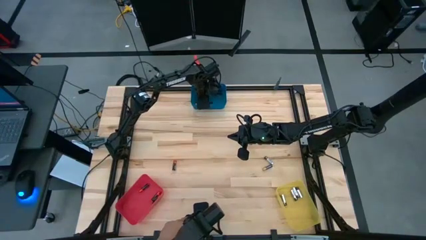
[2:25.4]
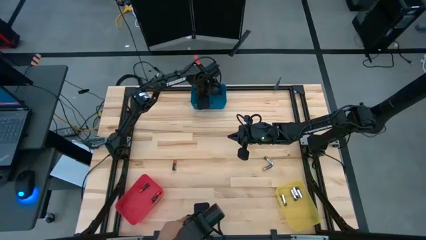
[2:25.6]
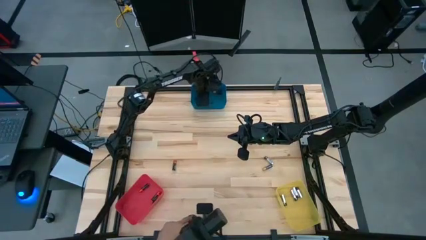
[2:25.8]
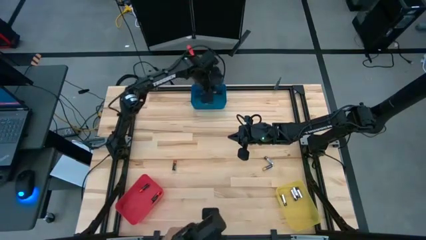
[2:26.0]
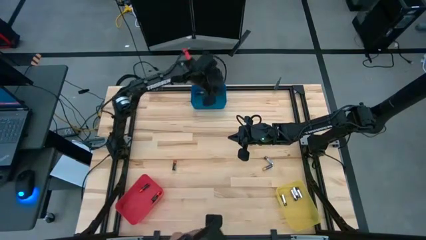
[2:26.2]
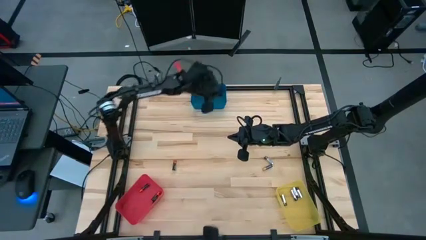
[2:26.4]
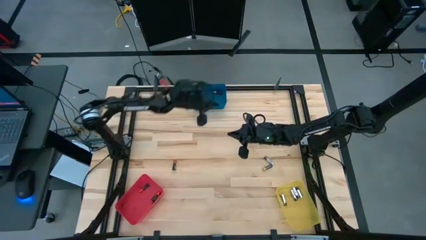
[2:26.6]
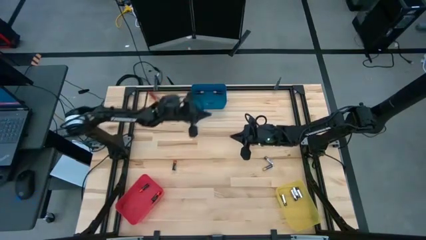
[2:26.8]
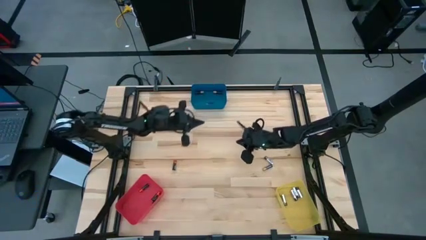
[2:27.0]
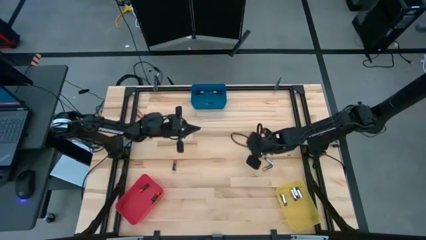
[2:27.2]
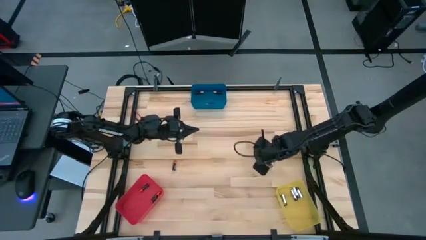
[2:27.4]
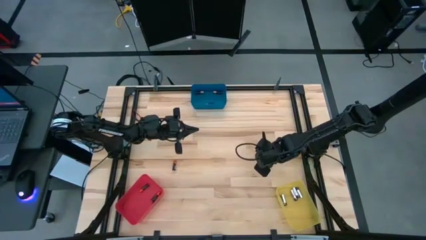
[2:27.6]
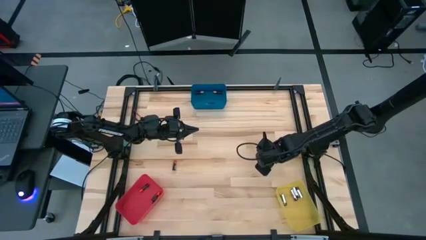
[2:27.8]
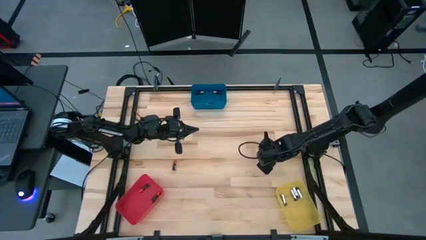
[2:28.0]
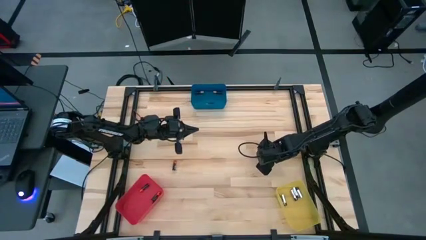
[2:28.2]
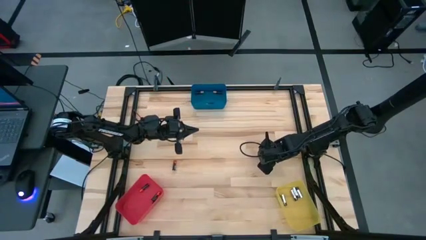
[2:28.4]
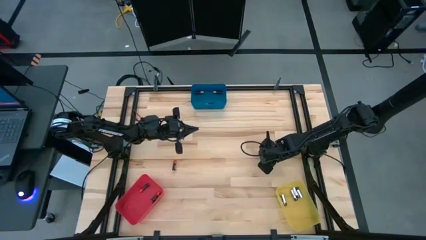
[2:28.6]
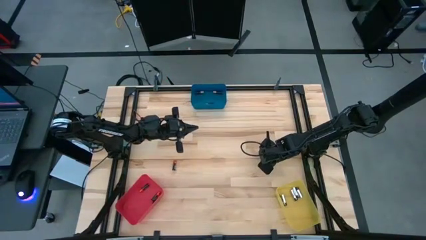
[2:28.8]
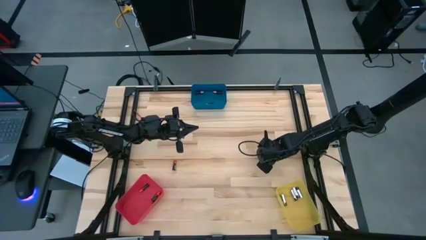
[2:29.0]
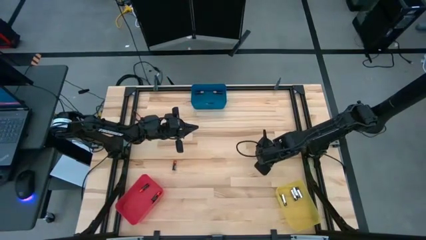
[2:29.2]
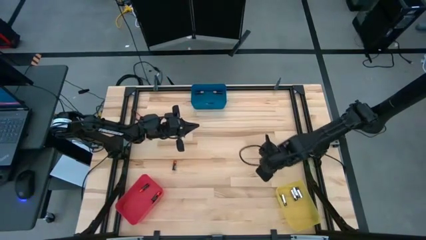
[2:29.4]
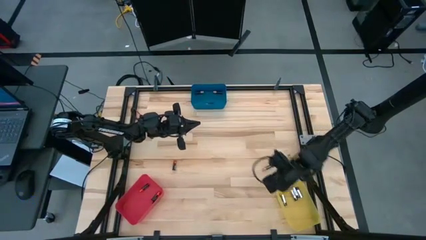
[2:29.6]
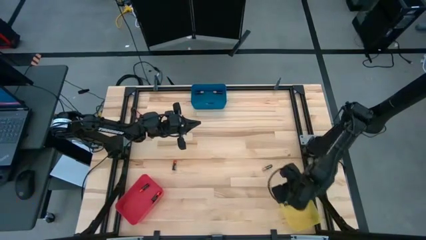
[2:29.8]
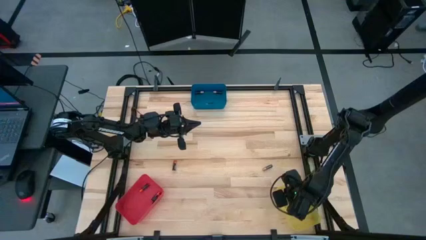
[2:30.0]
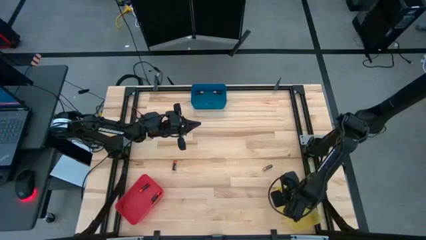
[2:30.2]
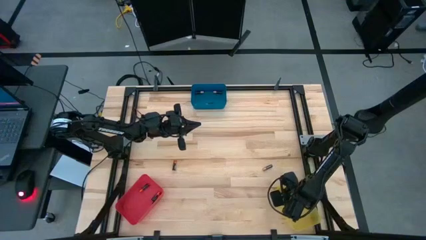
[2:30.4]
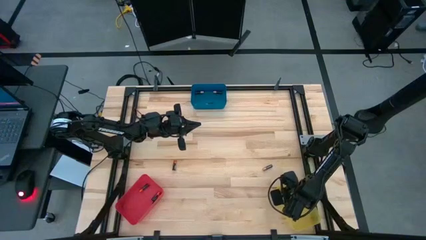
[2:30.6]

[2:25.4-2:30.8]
Task: Sort batteries
Put the silver battery into the yellow bin

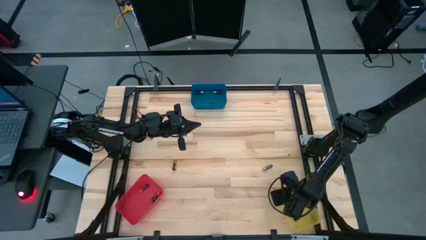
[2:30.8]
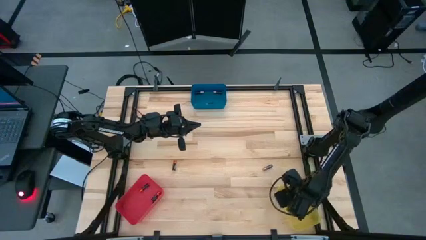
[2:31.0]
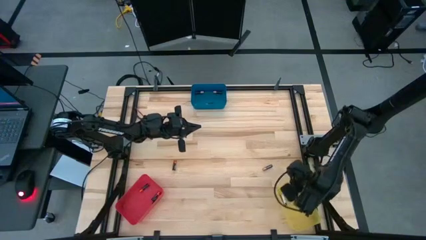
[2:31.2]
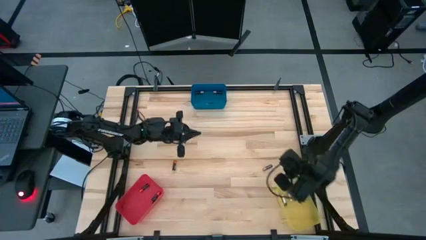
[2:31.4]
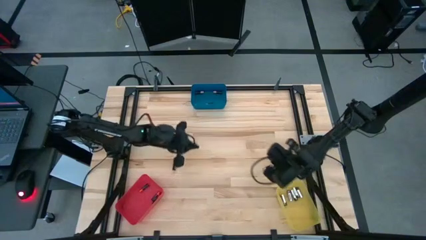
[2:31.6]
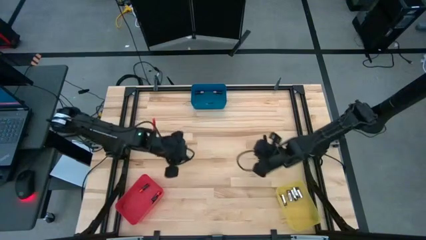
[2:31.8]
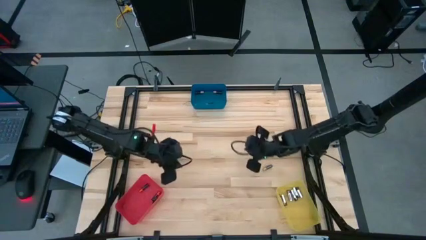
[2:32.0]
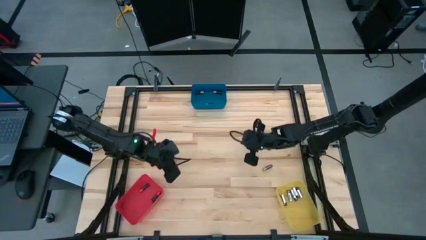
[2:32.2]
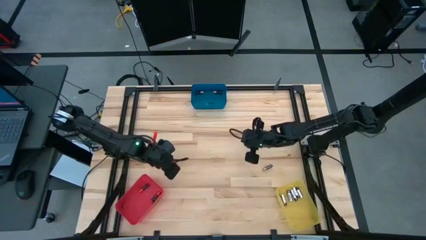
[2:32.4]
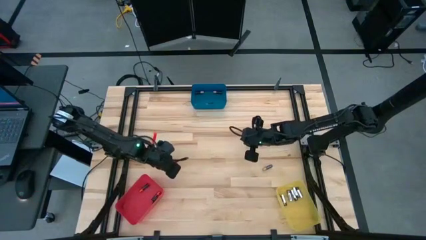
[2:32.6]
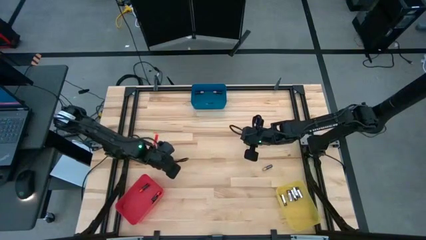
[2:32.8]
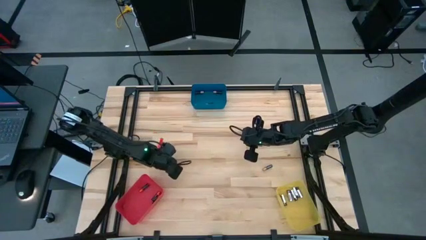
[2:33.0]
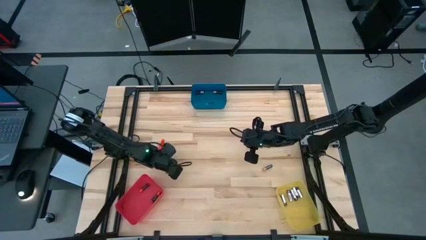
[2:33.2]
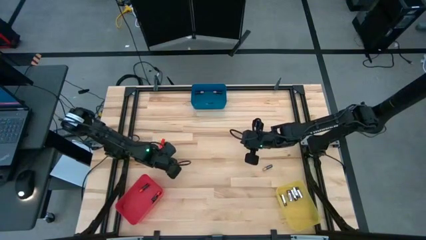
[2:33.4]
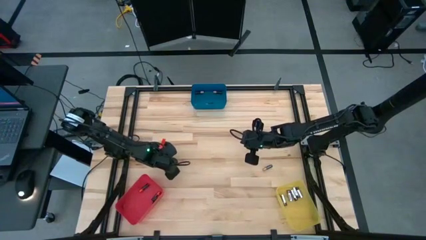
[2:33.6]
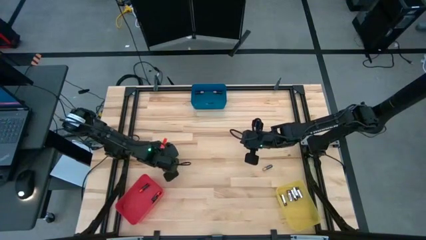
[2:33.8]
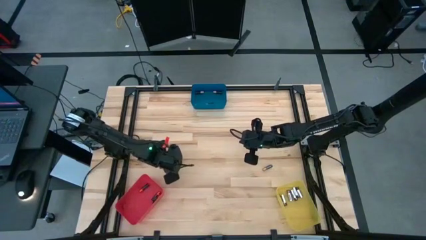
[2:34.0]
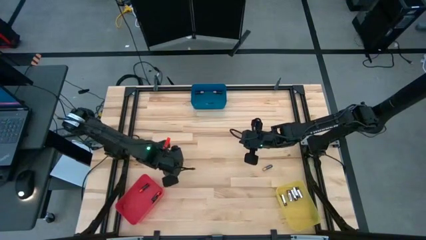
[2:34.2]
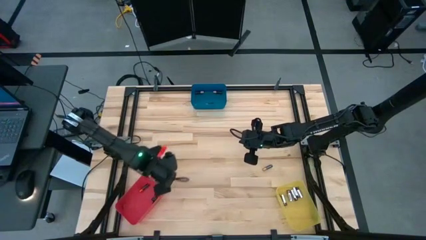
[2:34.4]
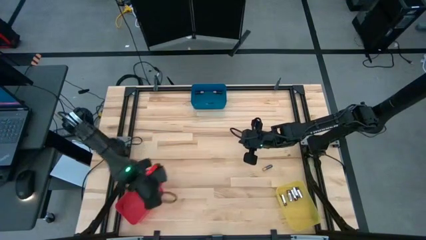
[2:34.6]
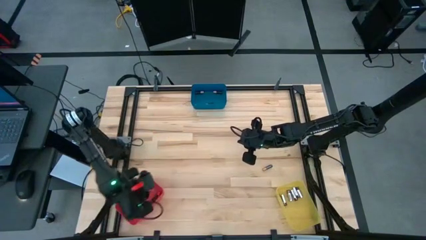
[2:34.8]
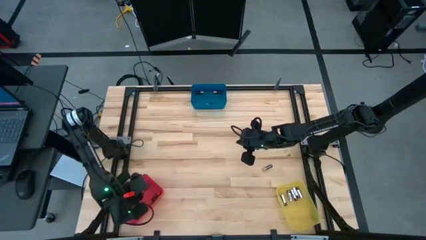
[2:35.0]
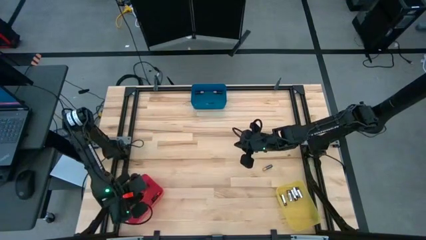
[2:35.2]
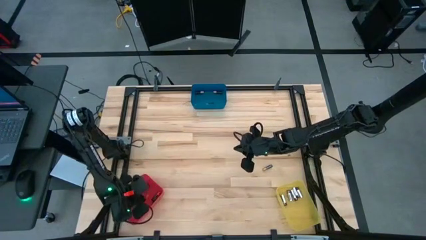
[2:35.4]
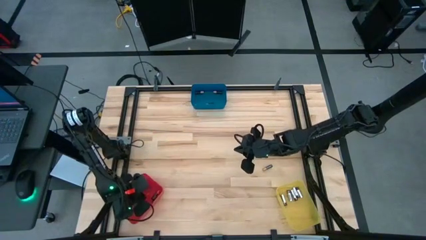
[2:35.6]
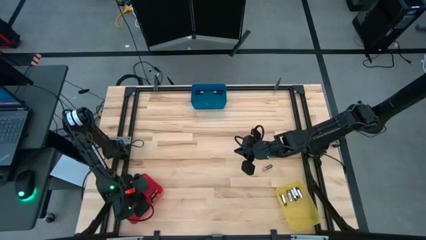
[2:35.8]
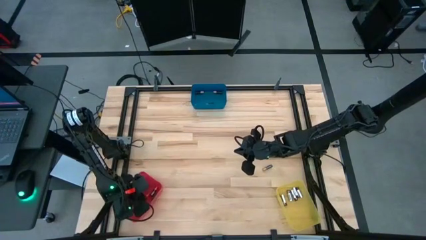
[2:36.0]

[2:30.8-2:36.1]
Put the black-red battery into the red bin

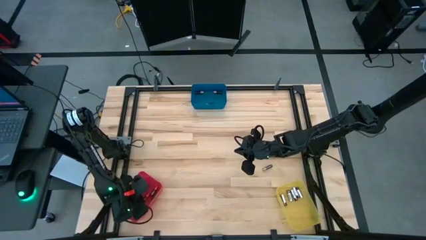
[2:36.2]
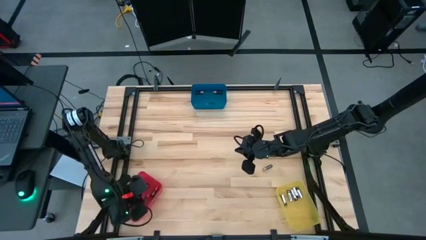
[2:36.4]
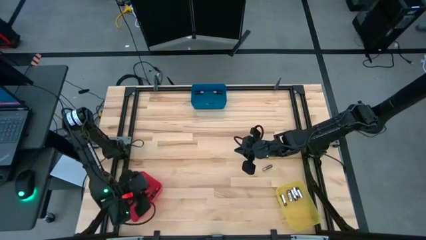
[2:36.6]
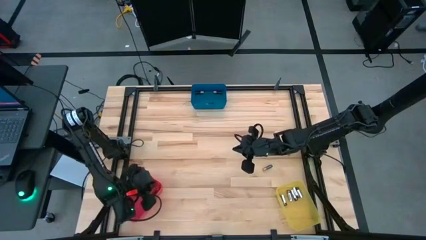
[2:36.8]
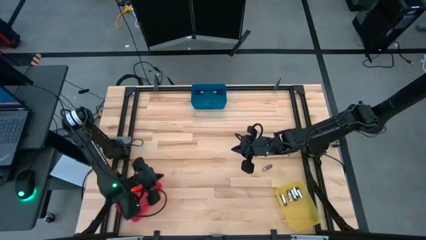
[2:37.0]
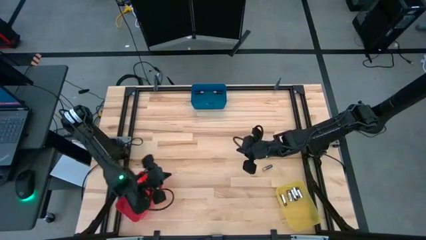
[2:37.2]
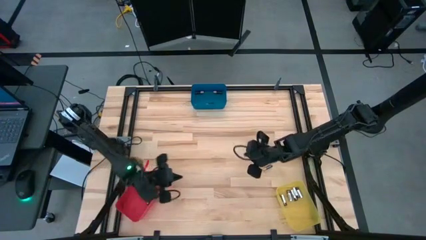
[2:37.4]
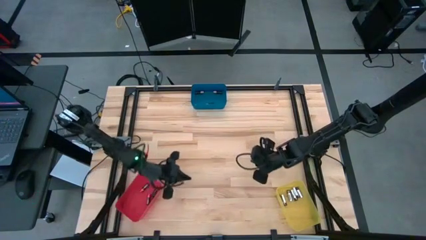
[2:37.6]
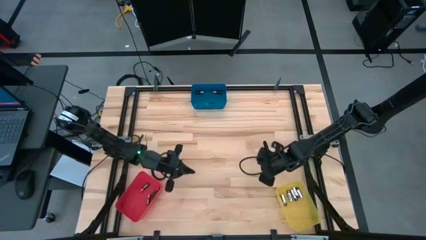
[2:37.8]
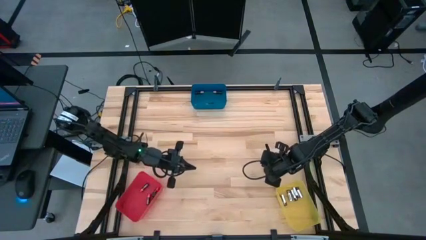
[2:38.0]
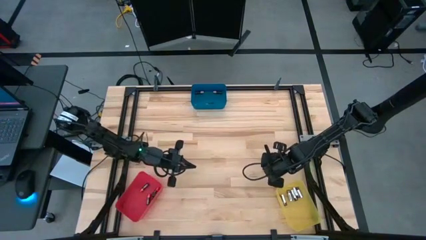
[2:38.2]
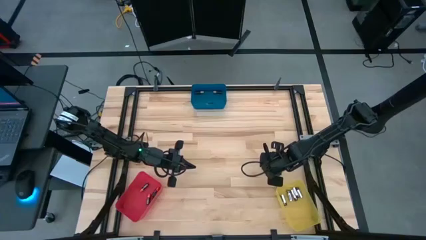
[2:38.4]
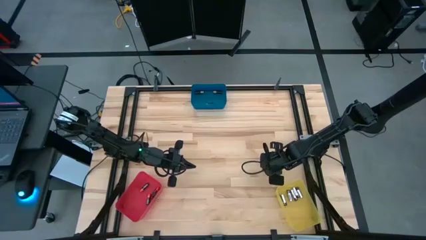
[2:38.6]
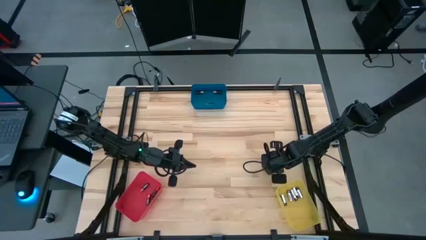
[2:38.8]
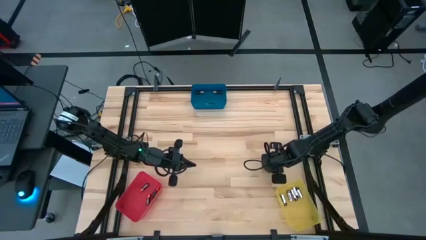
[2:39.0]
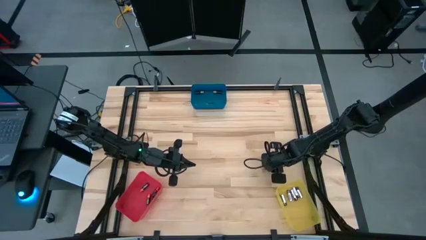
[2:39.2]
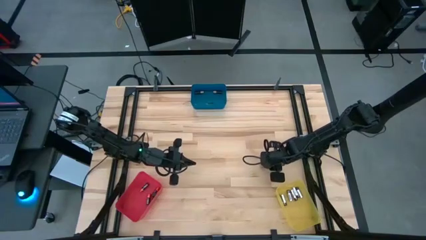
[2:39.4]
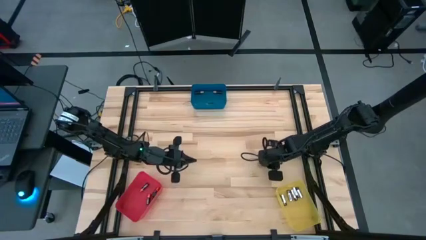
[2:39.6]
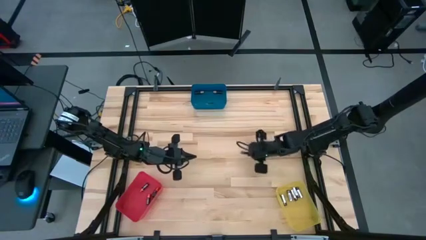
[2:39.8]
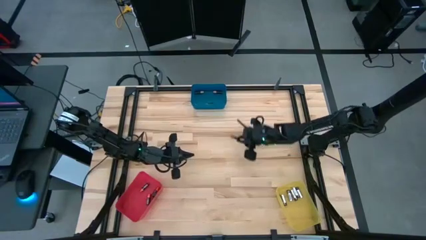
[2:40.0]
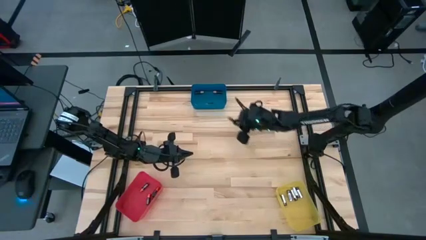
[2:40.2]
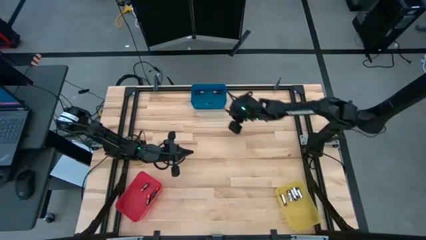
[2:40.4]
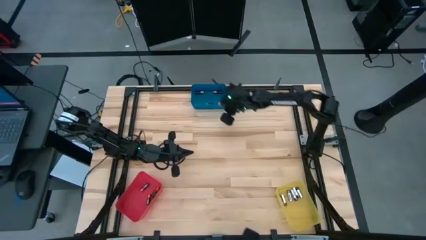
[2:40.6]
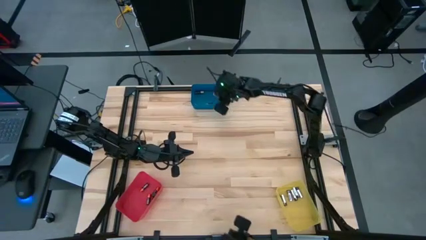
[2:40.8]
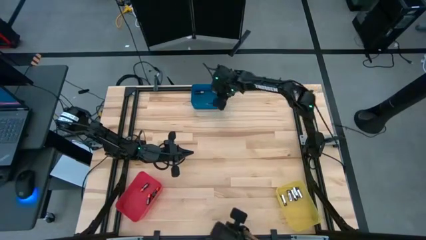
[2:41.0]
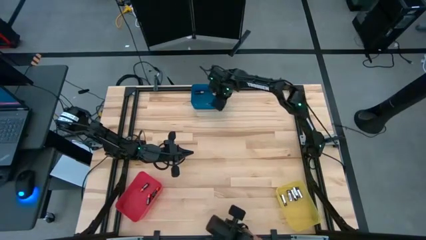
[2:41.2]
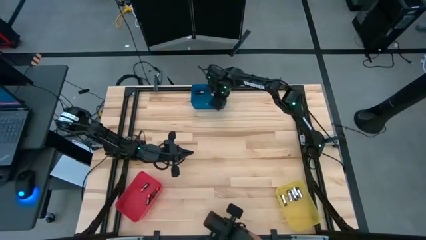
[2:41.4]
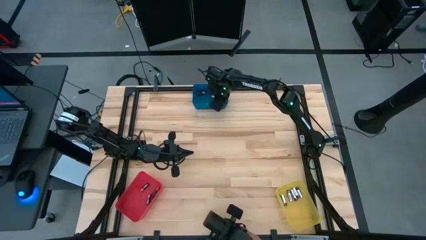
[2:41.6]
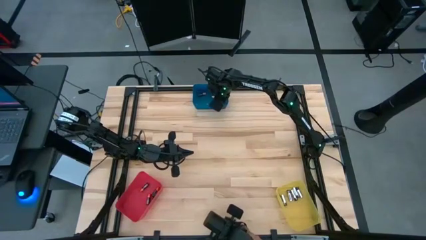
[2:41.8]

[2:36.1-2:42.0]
Put the black-brown battery into the blue bin
